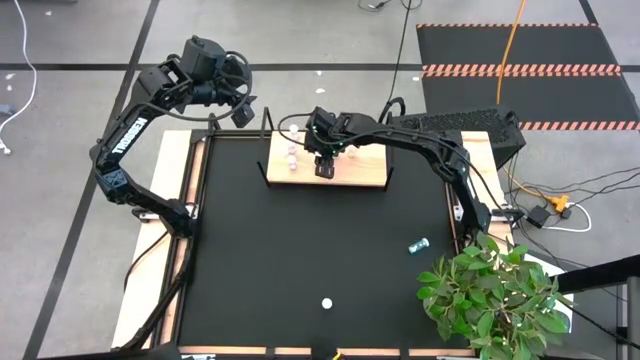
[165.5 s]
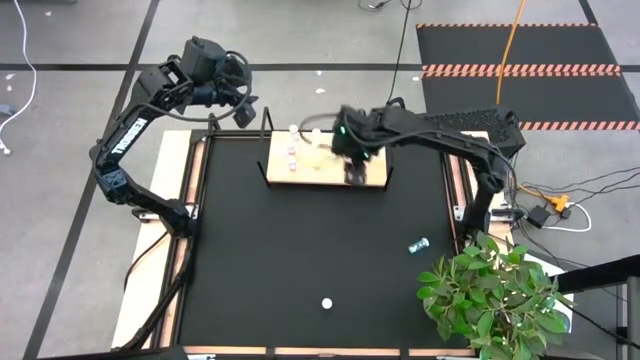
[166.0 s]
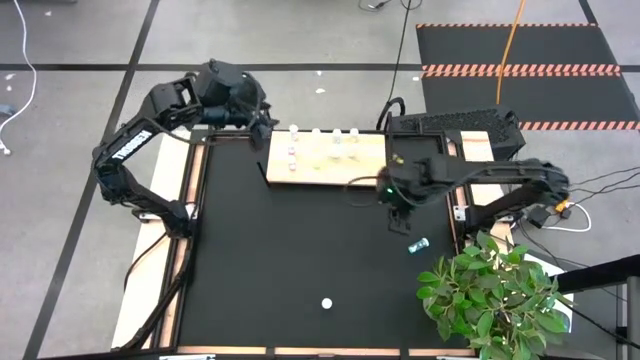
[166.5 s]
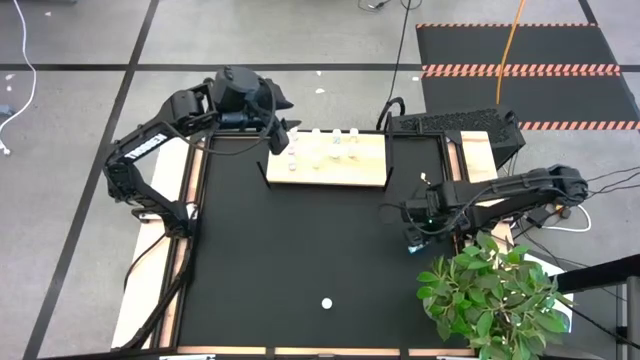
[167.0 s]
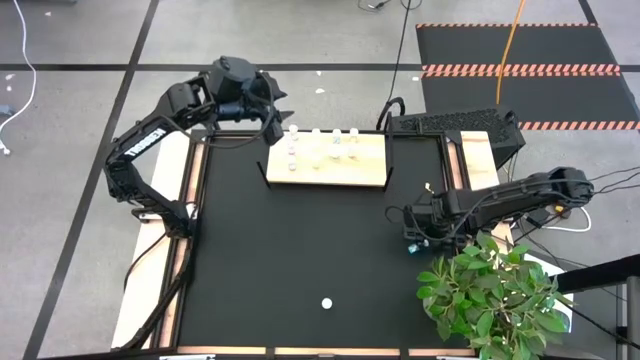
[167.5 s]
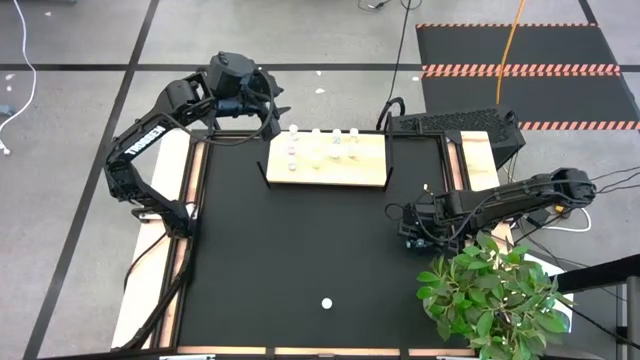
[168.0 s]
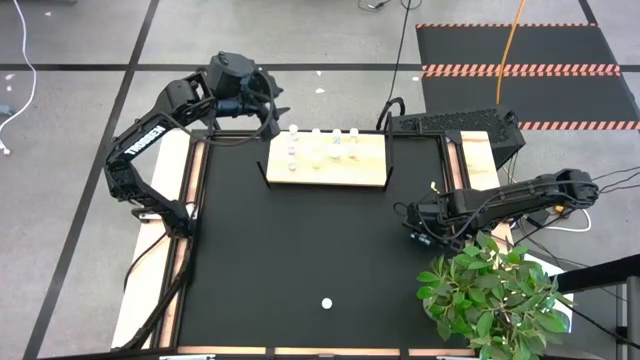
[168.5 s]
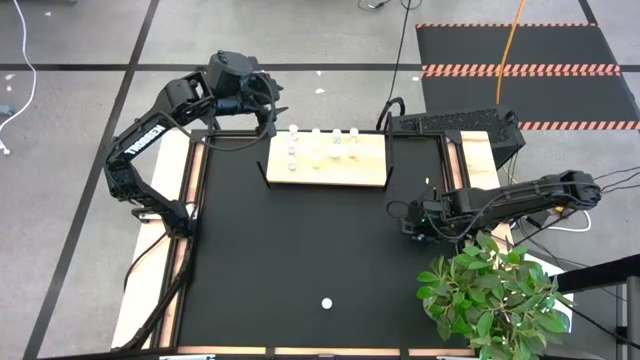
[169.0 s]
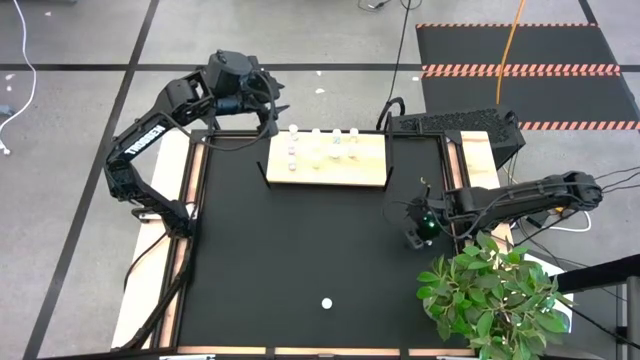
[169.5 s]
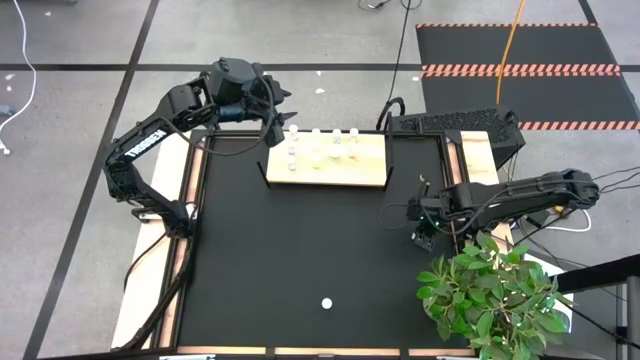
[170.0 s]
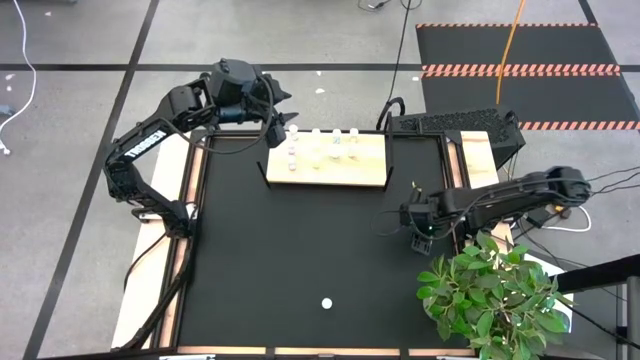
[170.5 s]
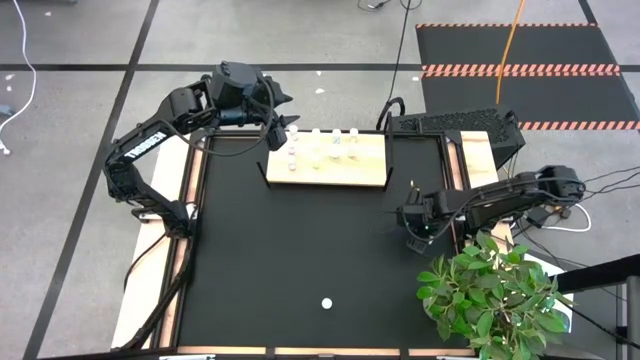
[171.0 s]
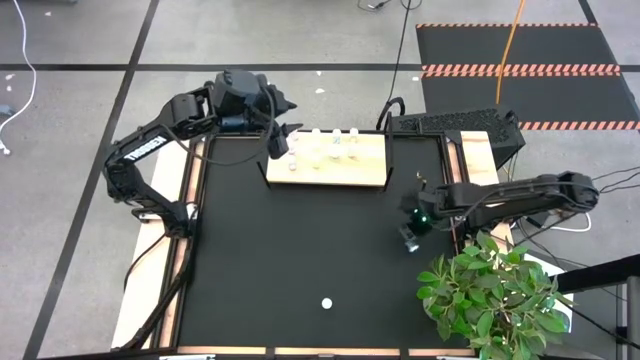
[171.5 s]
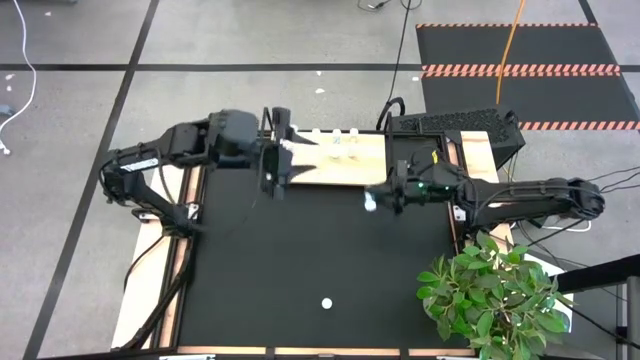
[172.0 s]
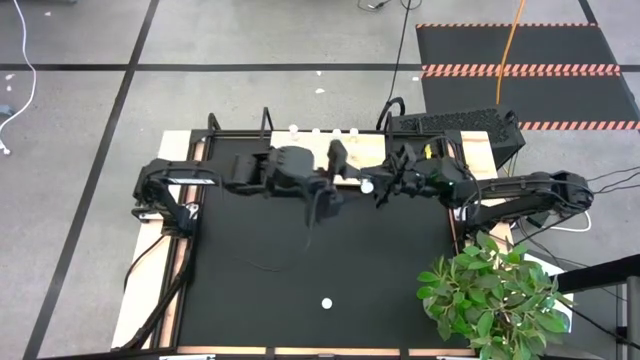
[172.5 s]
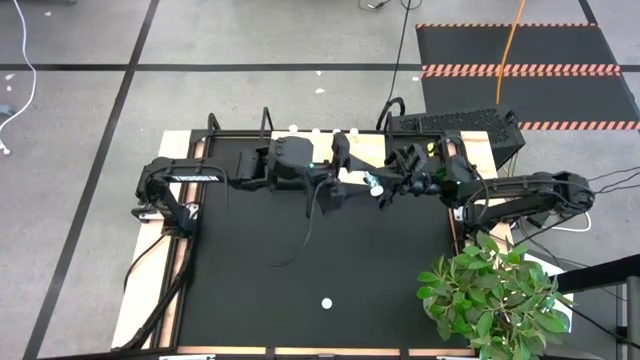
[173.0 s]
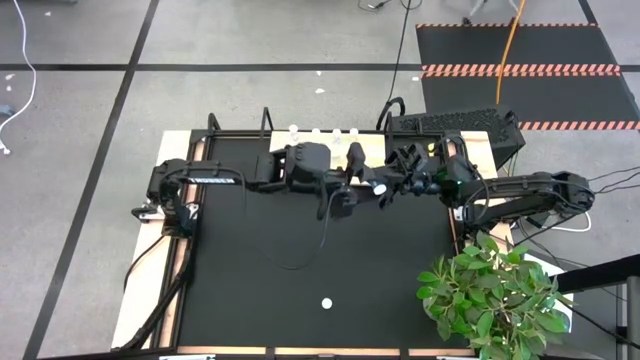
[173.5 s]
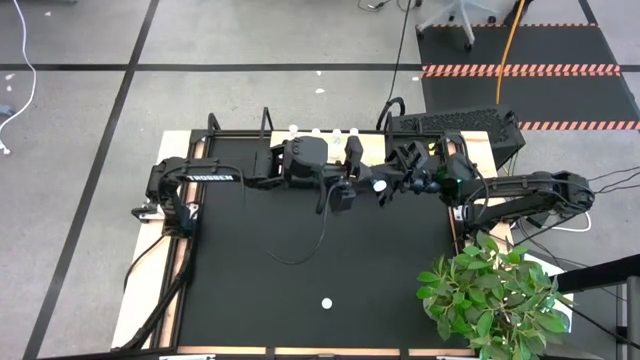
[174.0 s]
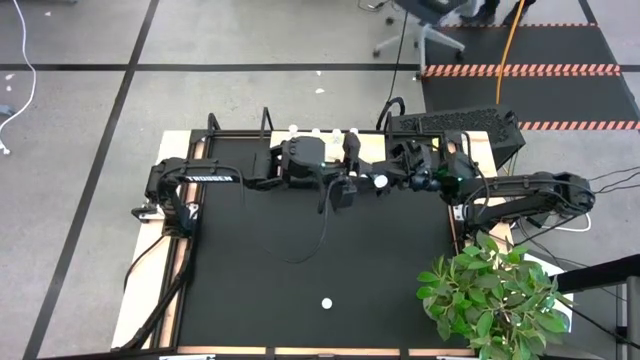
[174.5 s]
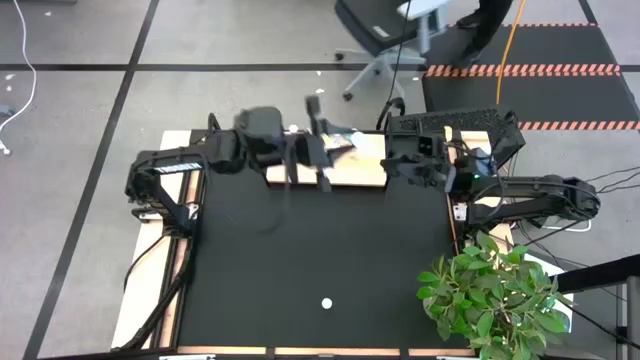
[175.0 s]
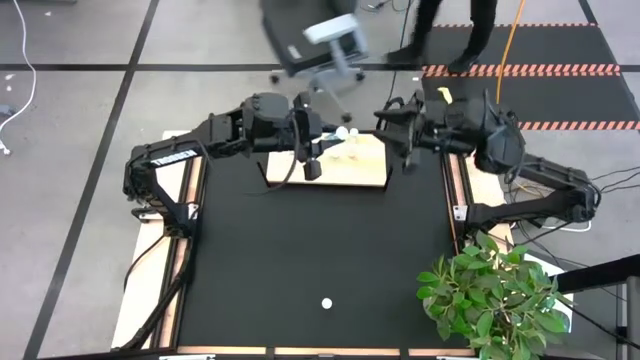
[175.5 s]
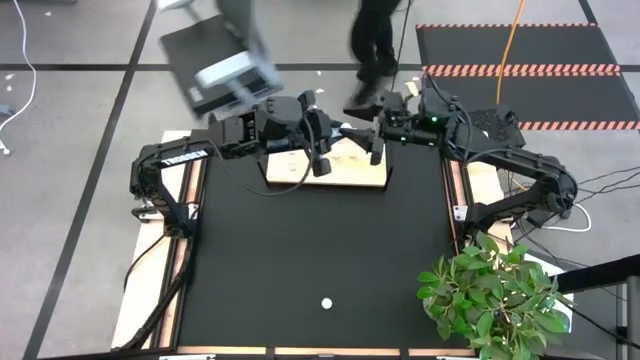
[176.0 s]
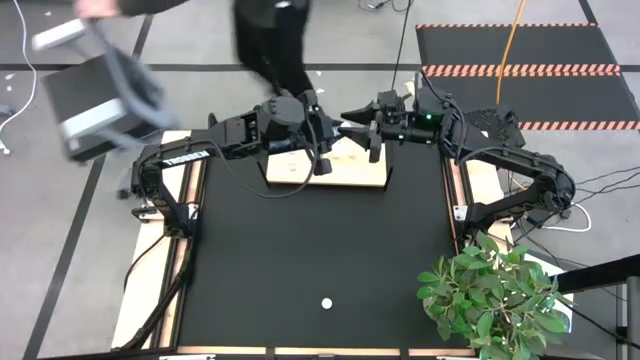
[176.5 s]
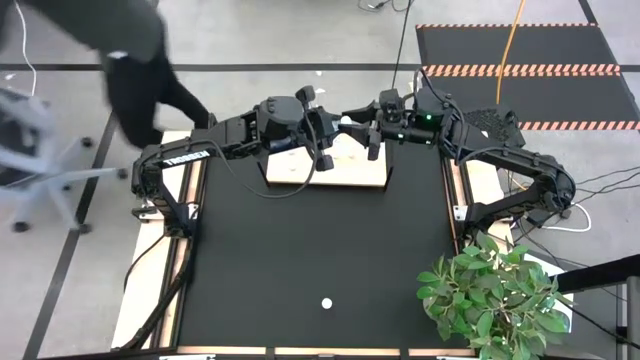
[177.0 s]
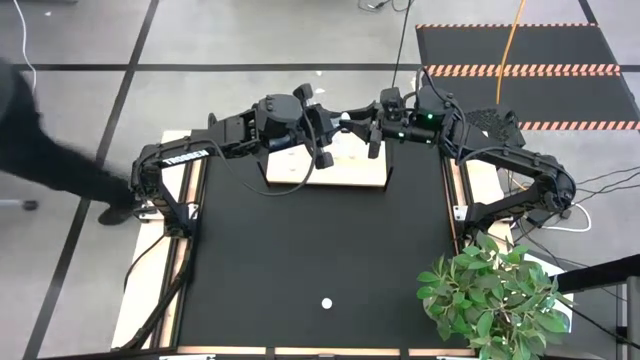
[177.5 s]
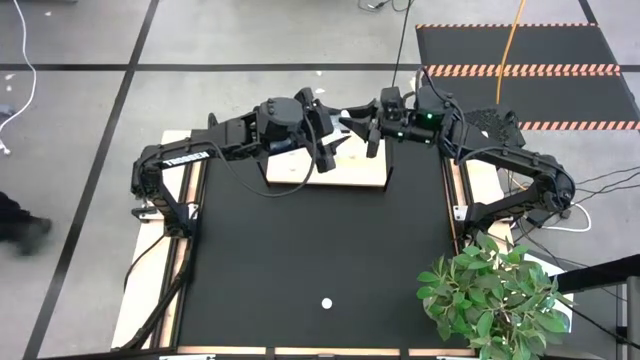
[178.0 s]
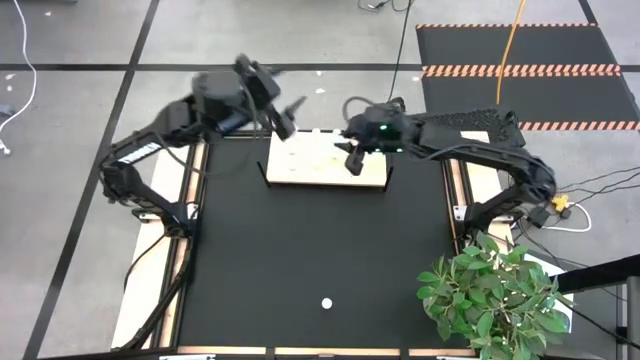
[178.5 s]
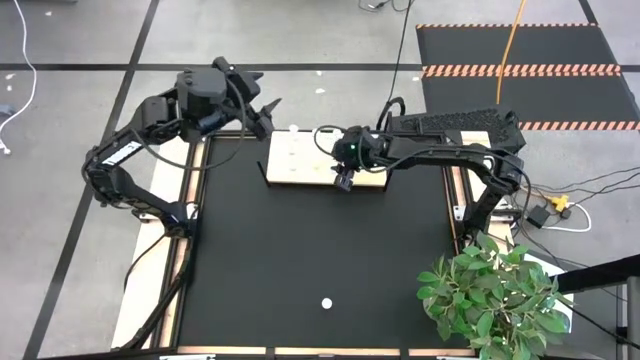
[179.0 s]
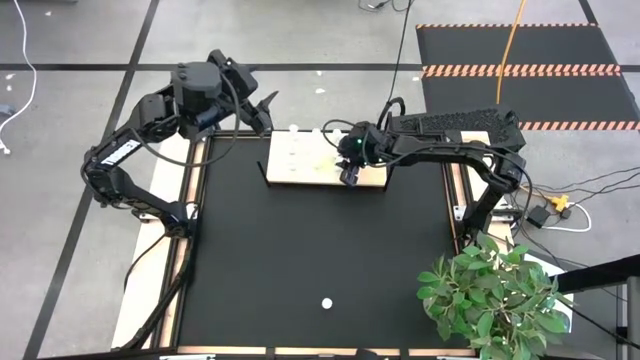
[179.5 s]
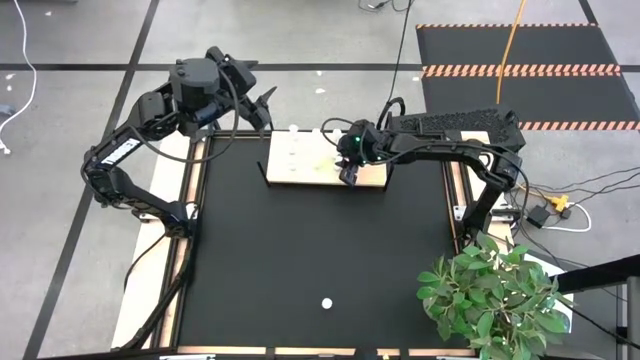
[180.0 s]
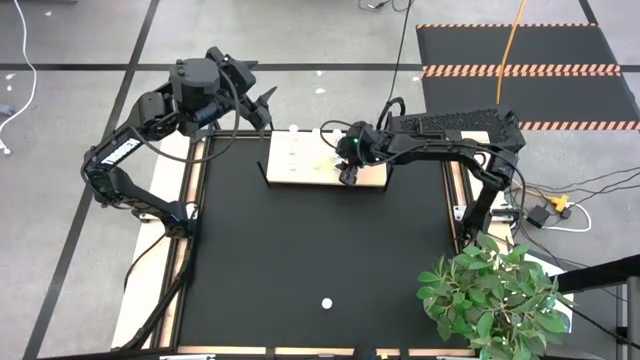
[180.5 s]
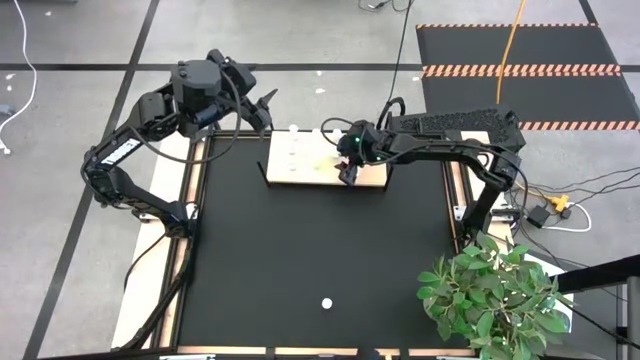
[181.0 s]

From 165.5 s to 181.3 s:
Task: Pick and place medicine bottles onto shelf by color
Put the blue pill bottle on the shelf aligned with the other blue pill bottles

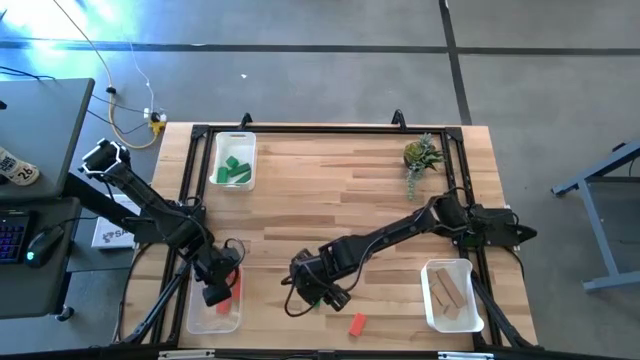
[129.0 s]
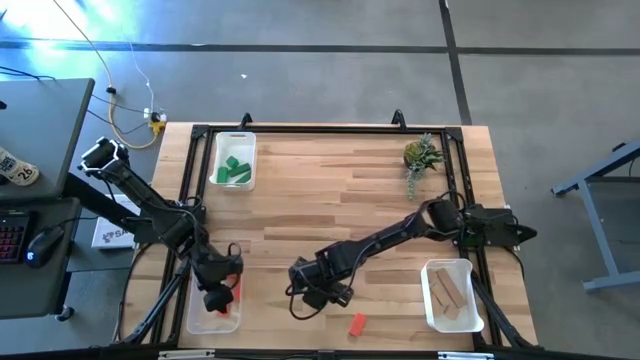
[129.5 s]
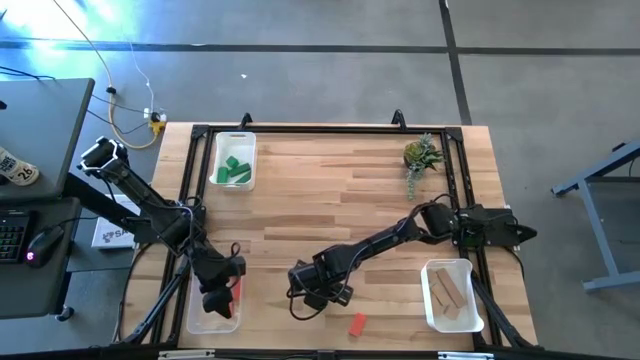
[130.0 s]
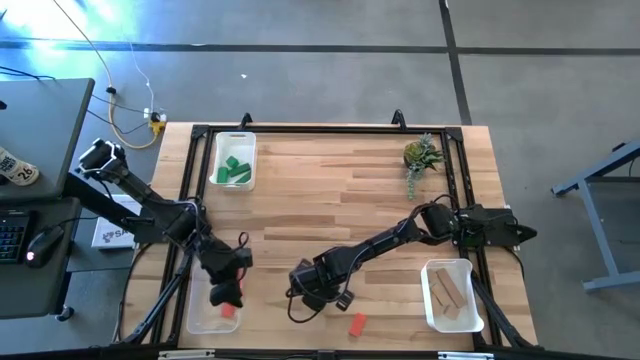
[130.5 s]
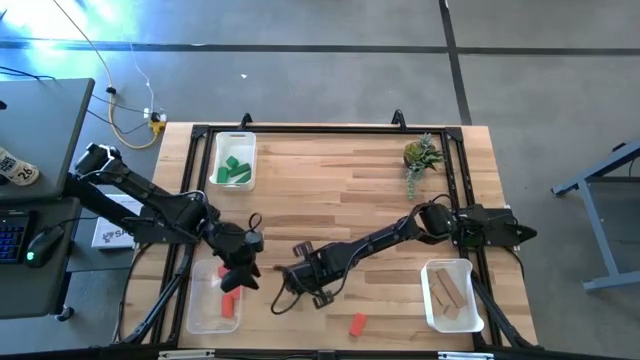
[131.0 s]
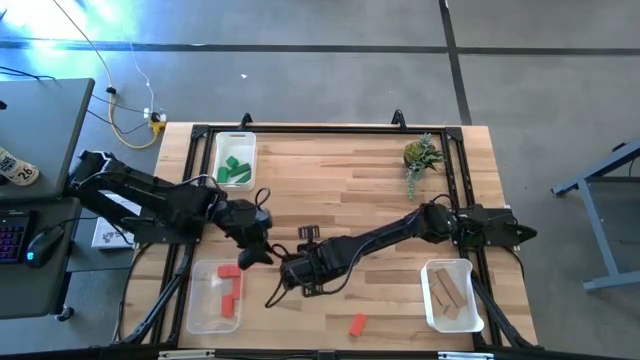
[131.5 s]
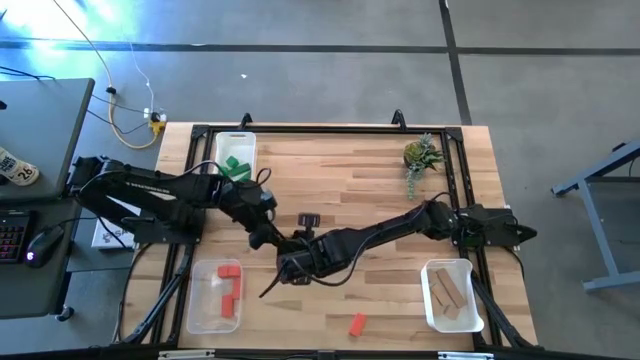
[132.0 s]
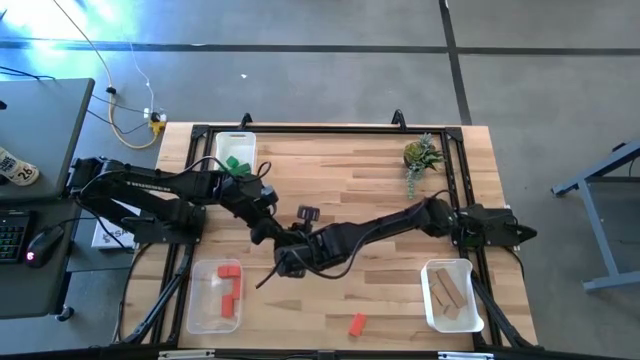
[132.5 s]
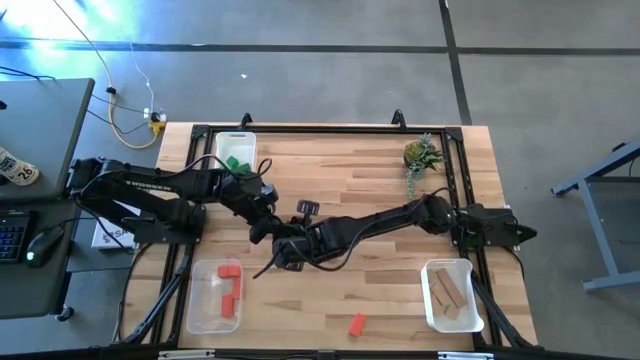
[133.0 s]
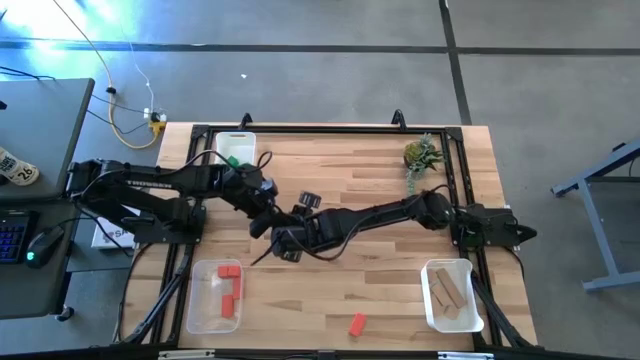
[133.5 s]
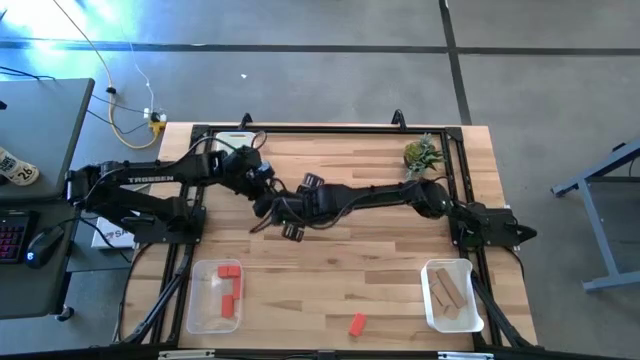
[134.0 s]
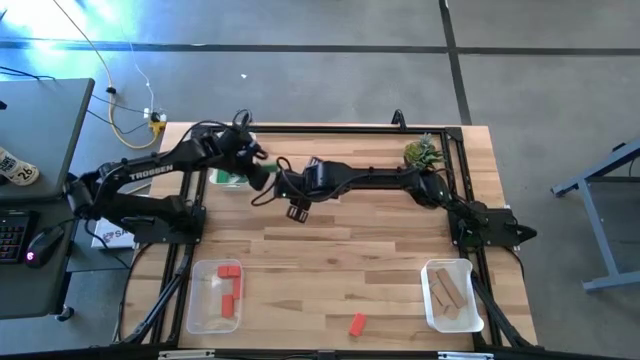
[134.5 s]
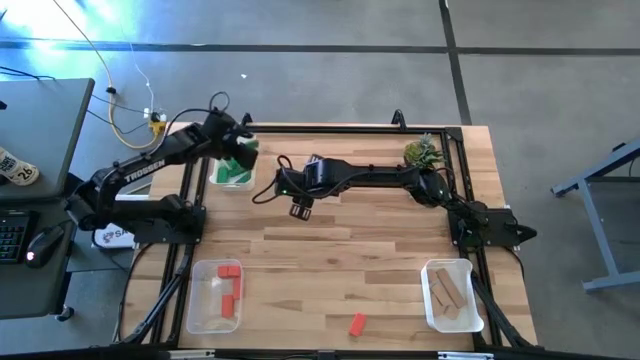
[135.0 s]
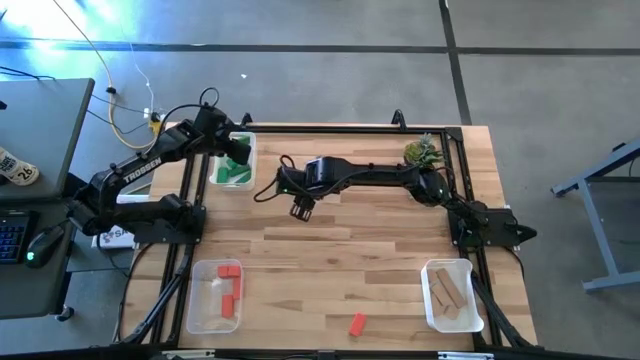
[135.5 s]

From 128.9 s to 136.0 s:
Task: Sort & place blocks by color
Put the green block into the top white bin
